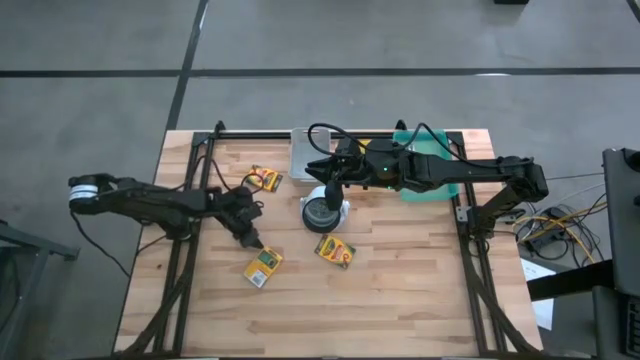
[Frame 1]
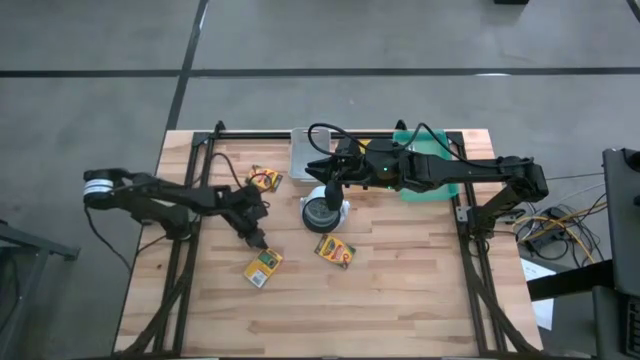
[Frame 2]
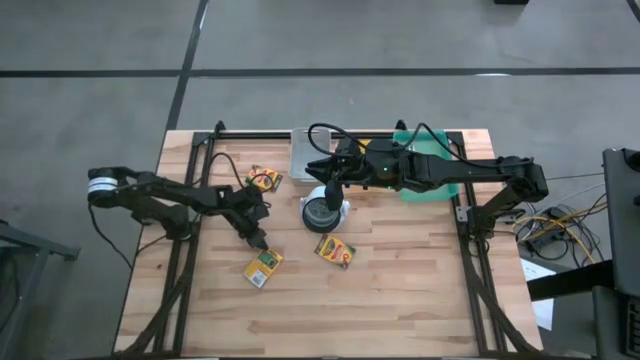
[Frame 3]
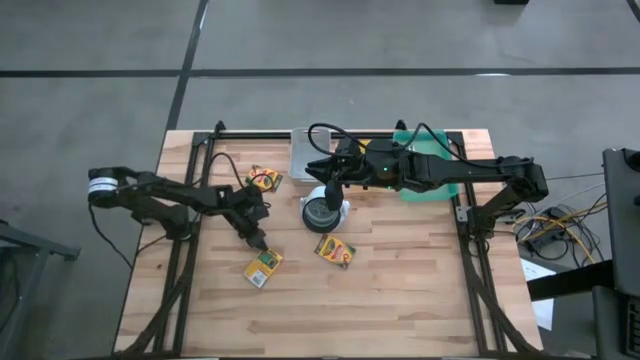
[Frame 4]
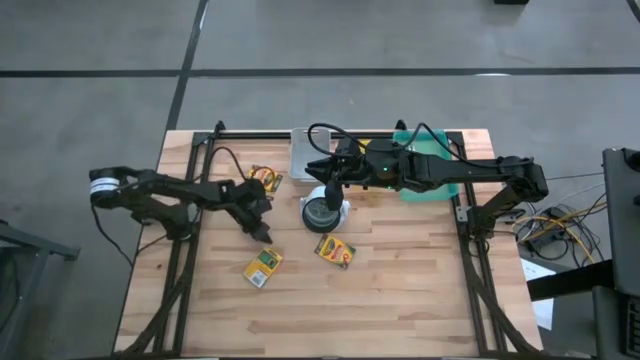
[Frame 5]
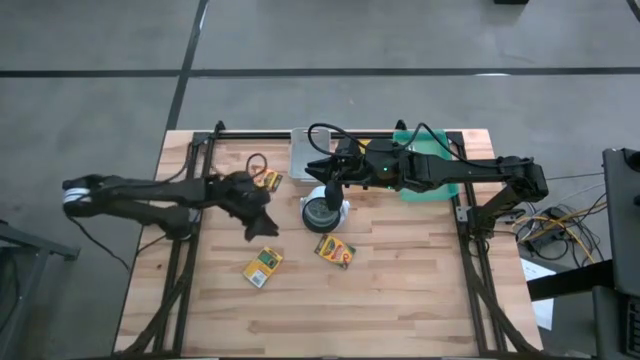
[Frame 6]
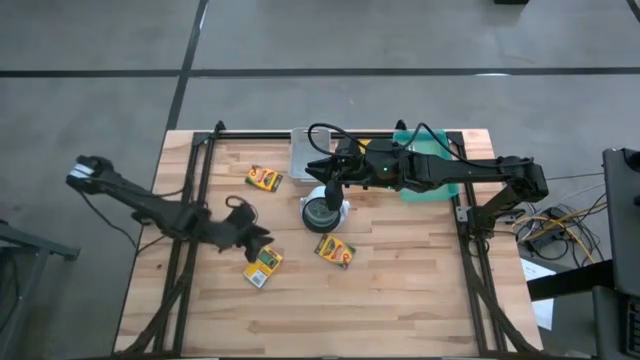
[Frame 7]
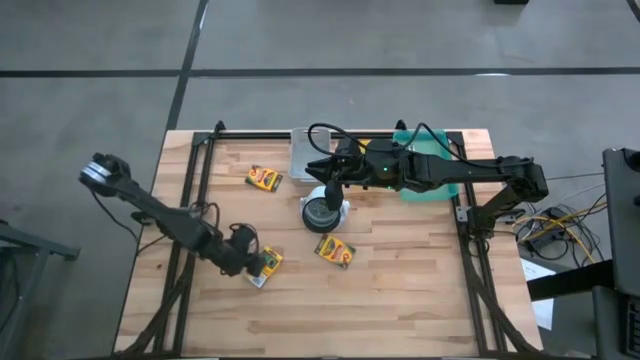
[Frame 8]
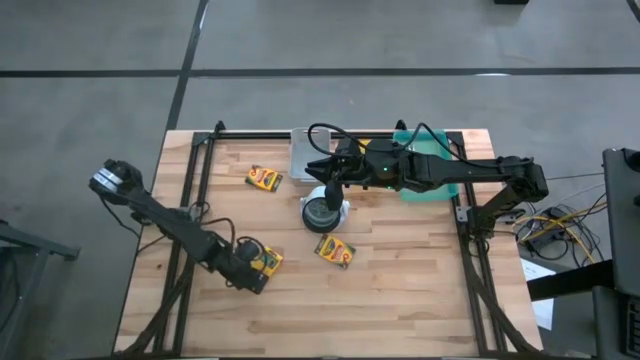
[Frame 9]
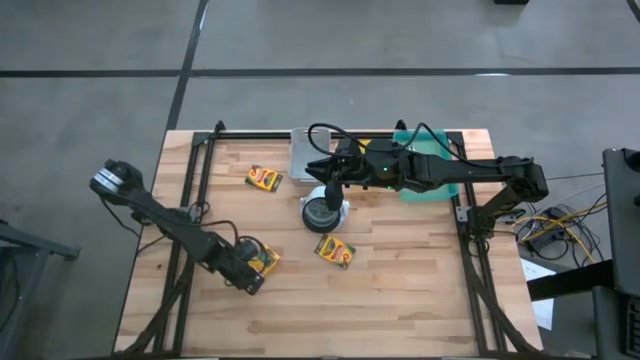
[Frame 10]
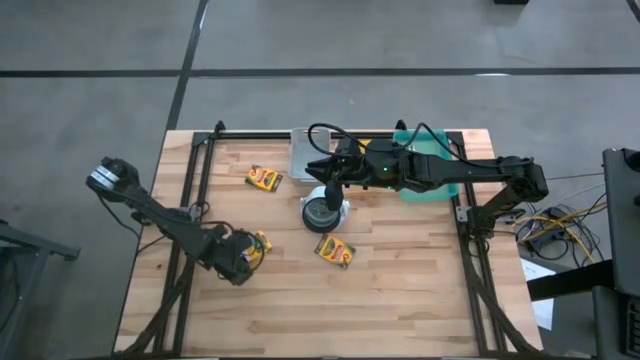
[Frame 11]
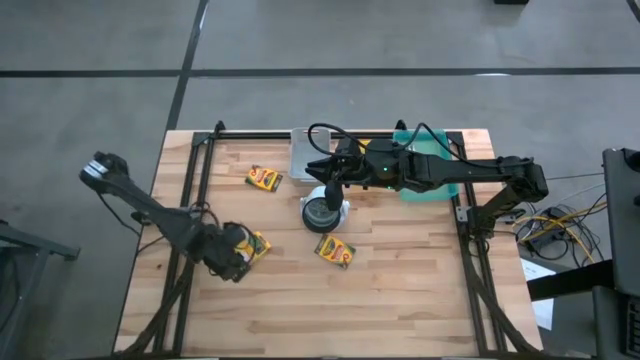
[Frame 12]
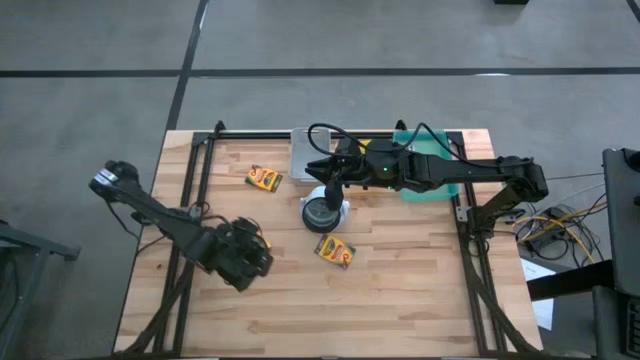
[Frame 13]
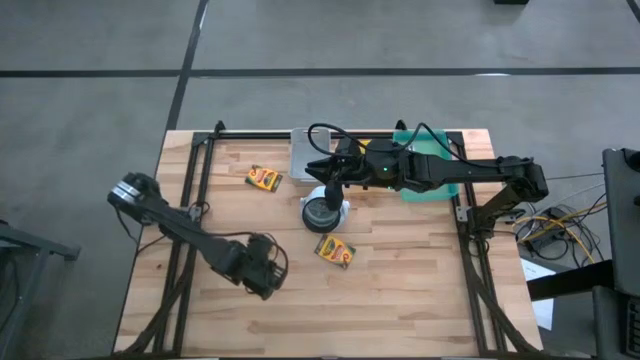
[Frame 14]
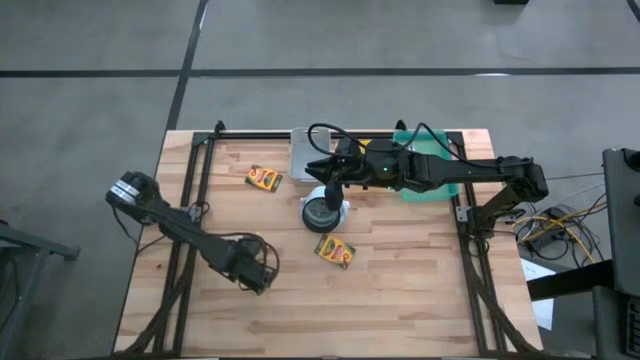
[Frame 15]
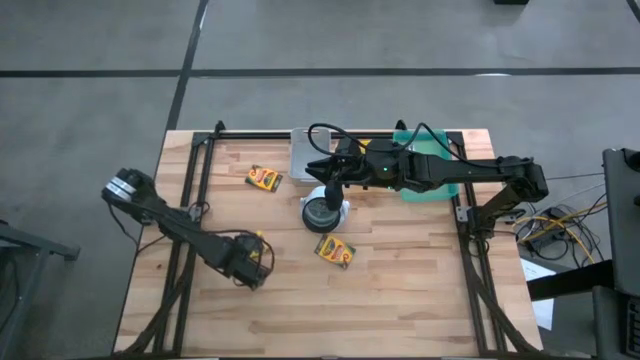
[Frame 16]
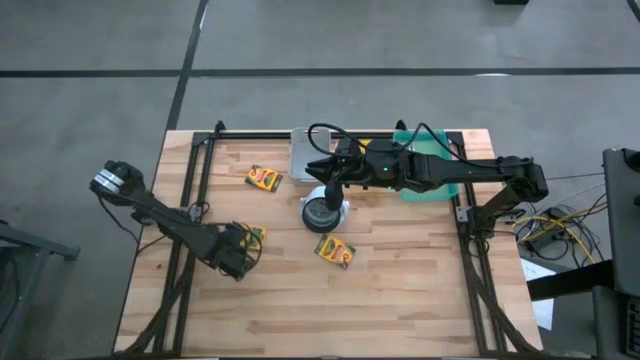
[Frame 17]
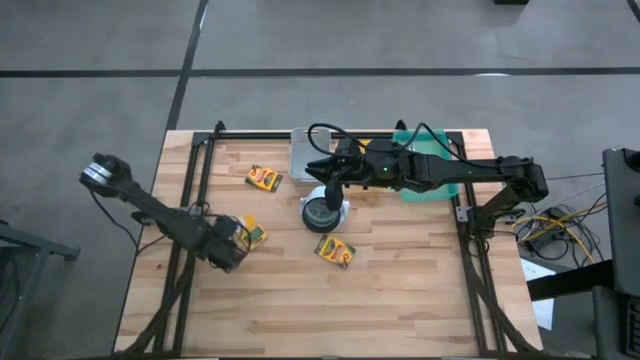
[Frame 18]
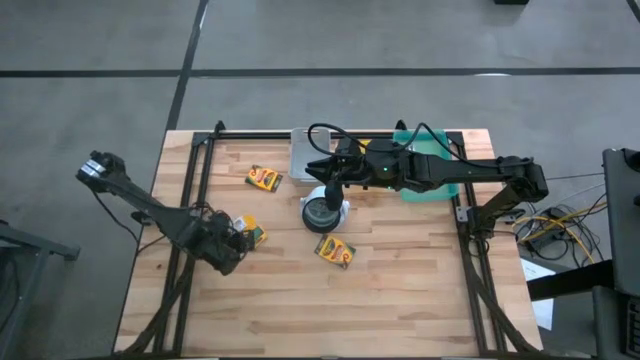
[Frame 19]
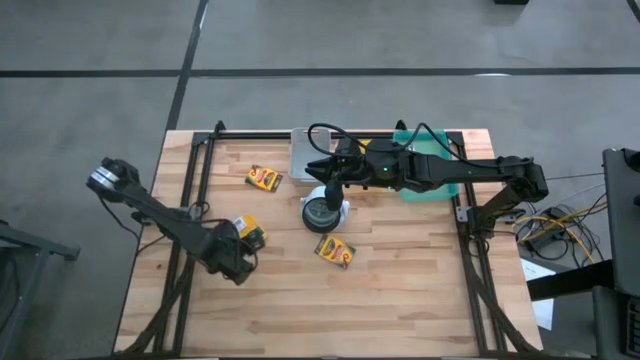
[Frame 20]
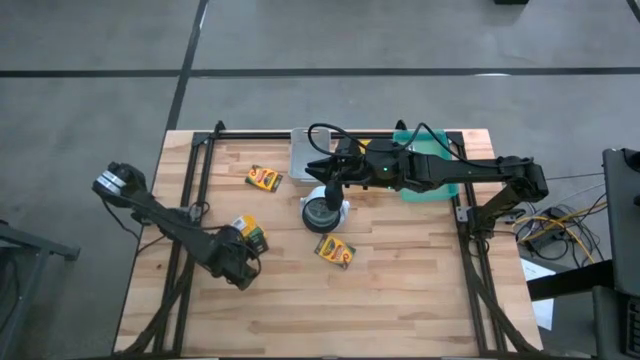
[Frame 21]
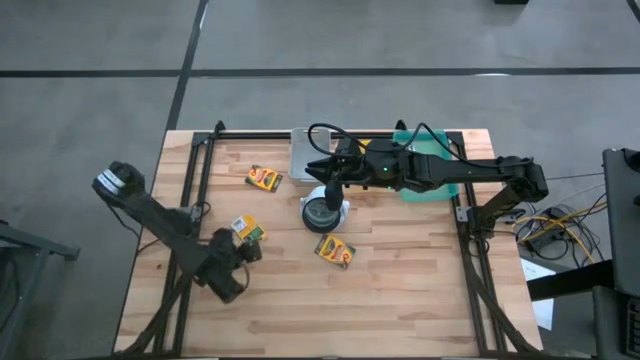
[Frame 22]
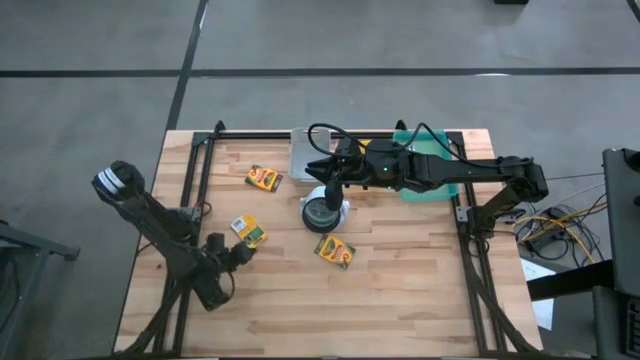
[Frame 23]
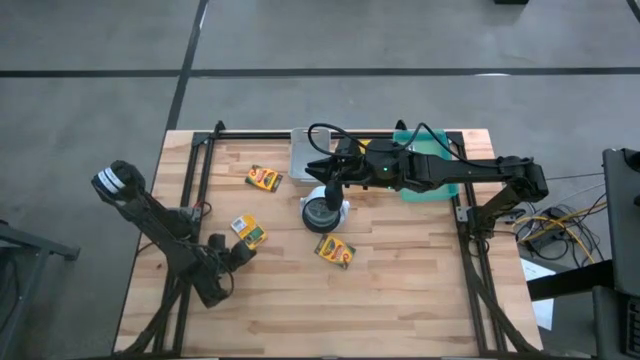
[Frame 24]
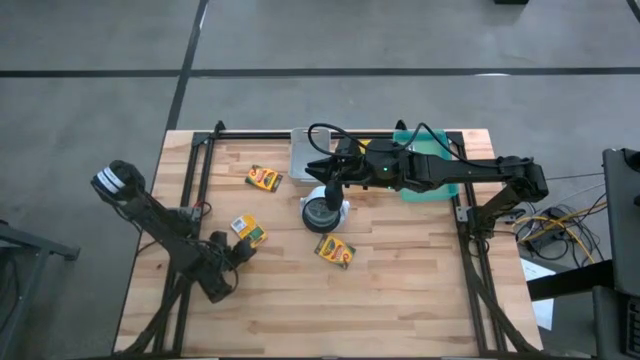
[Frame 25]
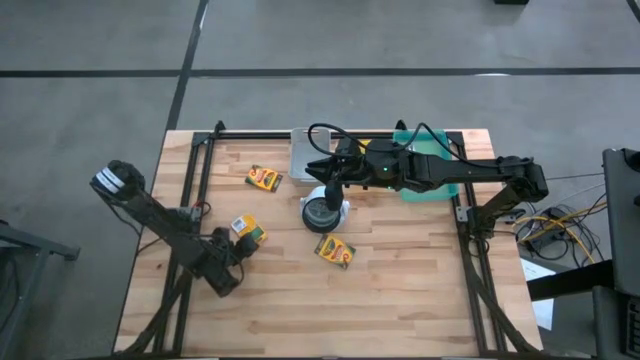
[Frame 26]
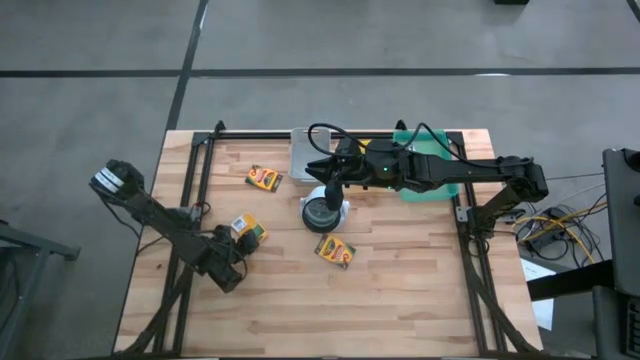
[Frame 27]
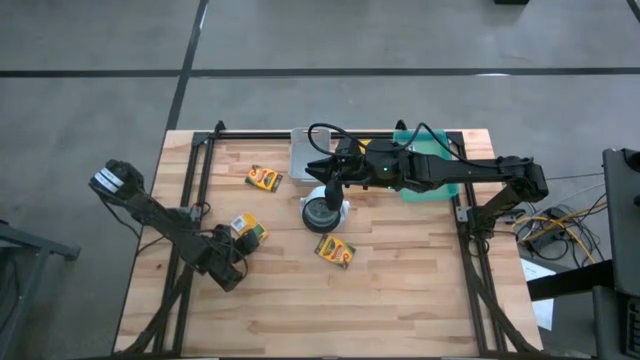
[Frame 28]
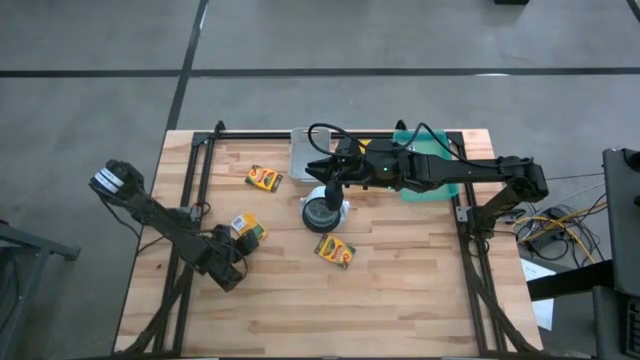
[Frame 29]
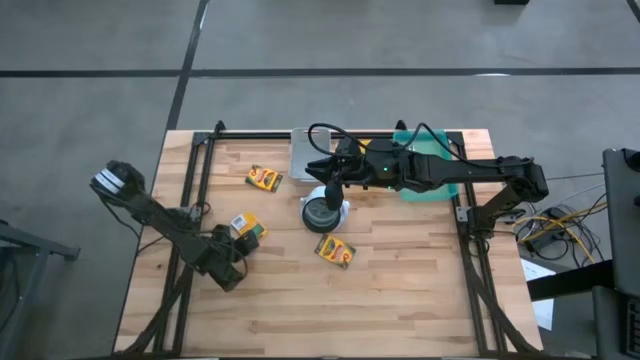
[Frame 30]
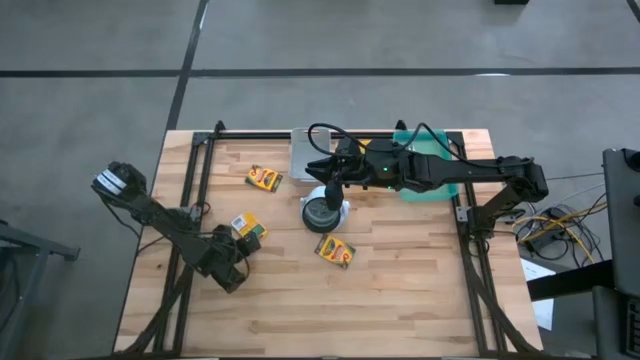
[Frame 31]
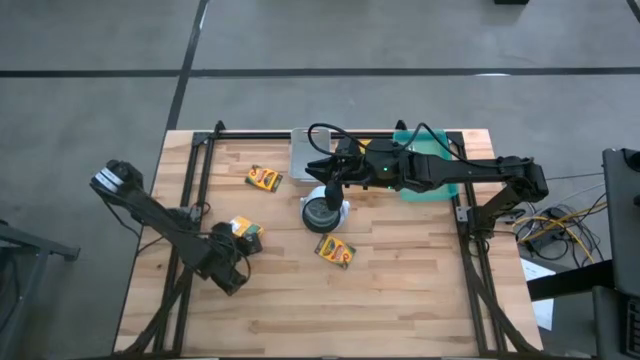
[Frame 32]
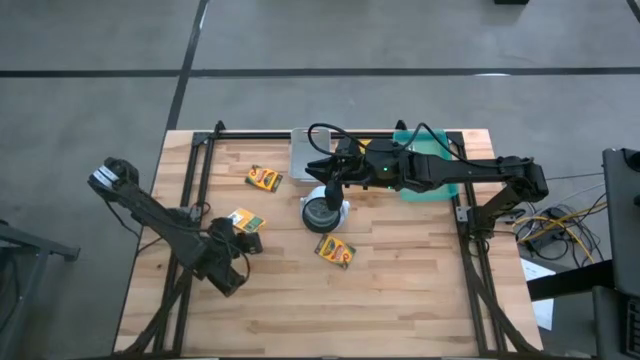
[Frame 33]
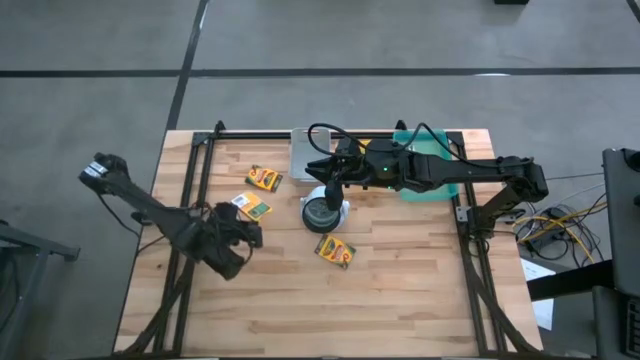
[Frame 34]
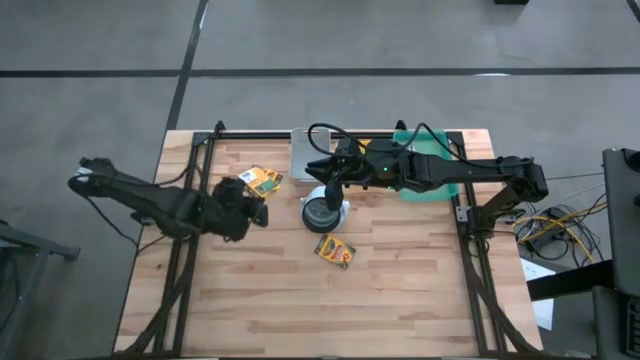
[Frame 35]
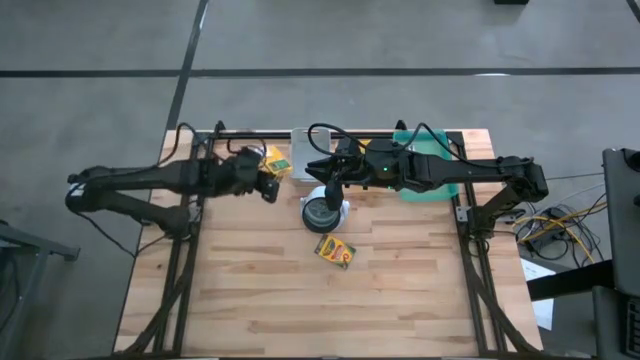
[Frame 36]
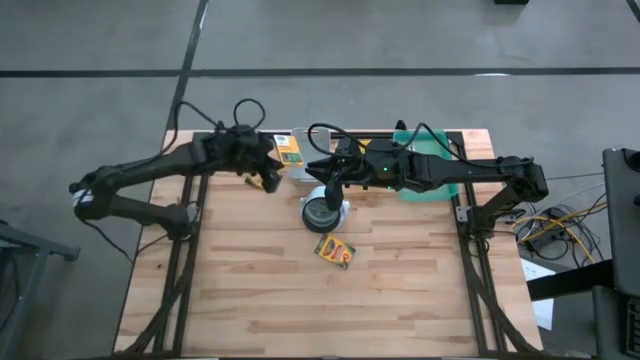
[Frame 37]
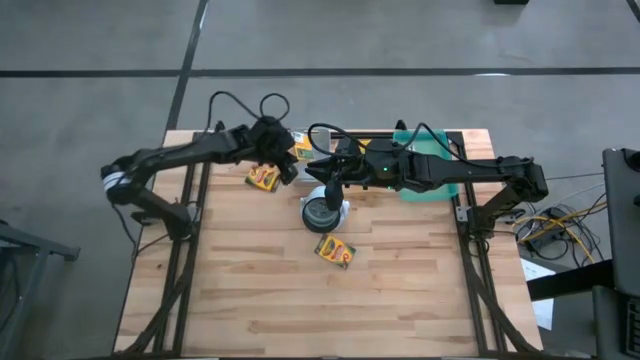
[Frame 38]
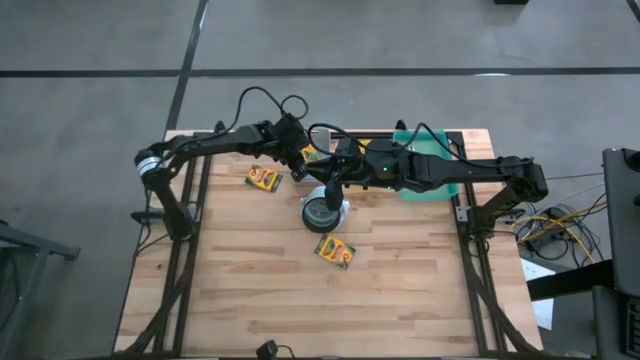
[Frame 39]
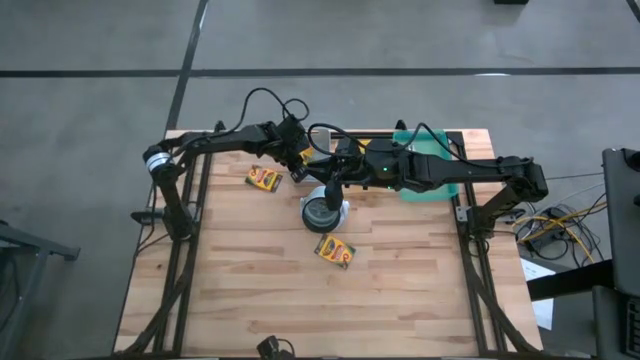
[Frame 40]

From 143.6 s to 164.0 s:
Task: Pick & Place School Supplies
Put the pack of crayon into the gray bin
